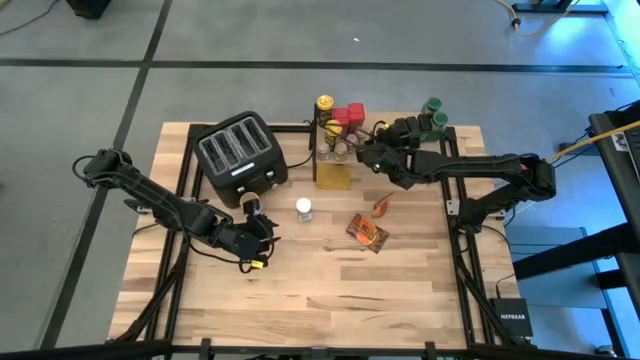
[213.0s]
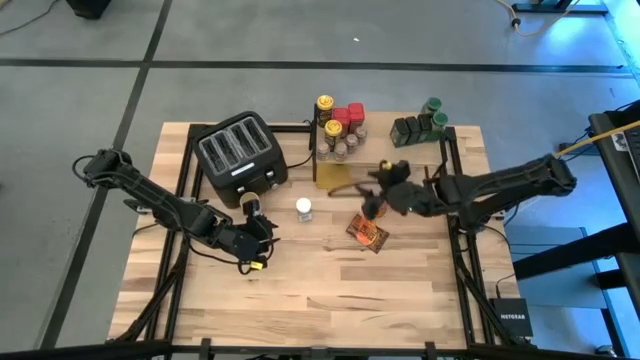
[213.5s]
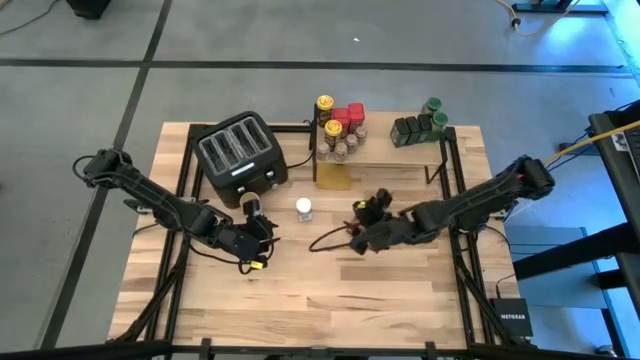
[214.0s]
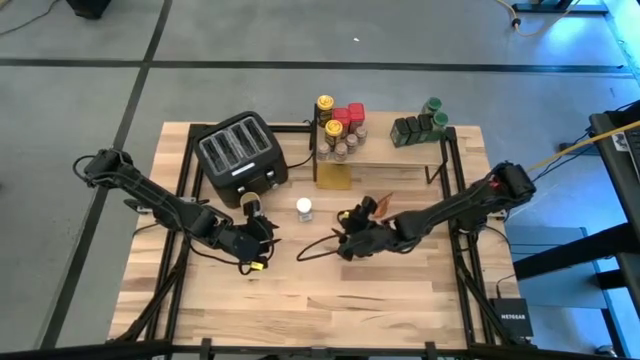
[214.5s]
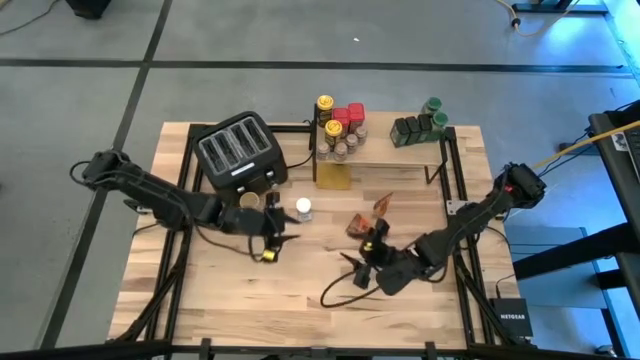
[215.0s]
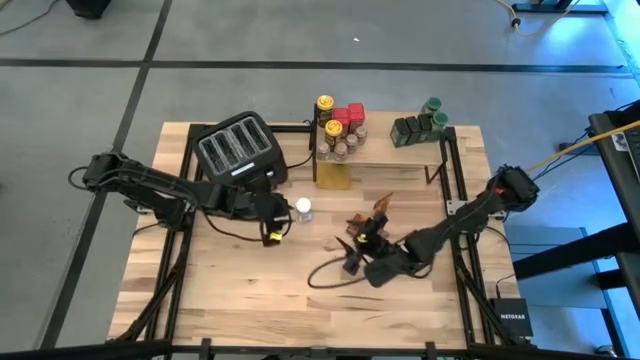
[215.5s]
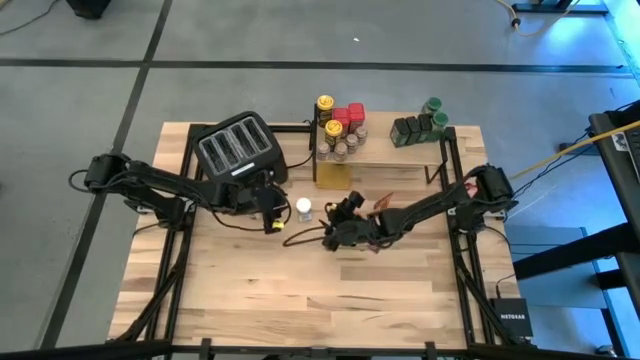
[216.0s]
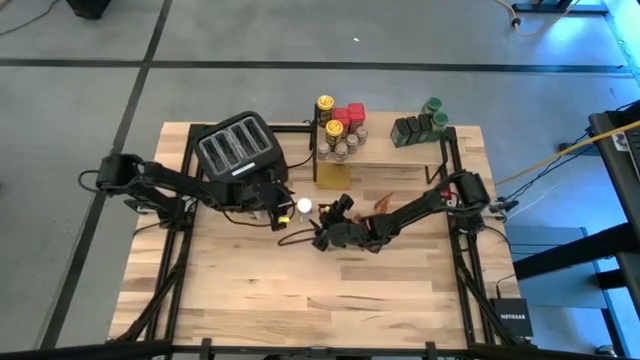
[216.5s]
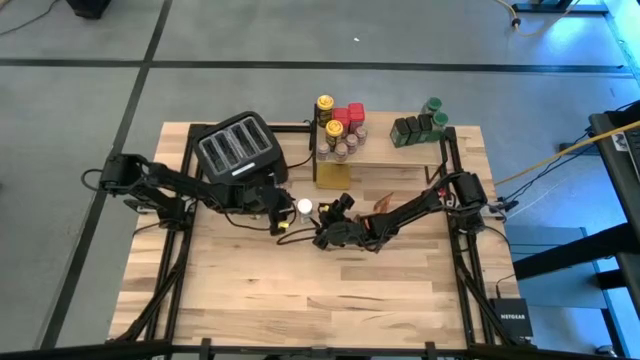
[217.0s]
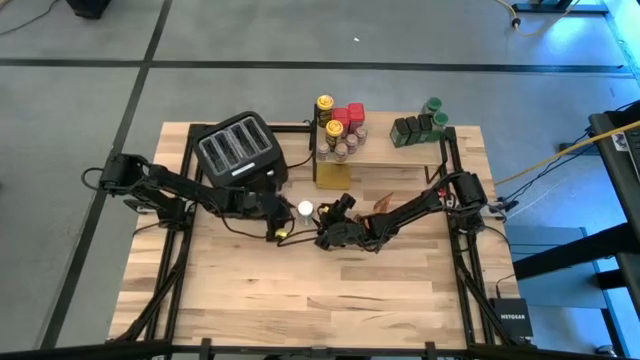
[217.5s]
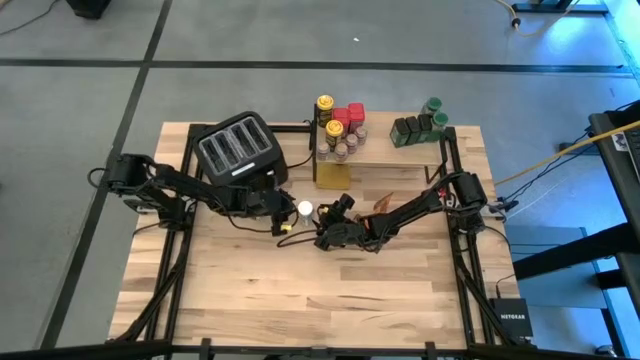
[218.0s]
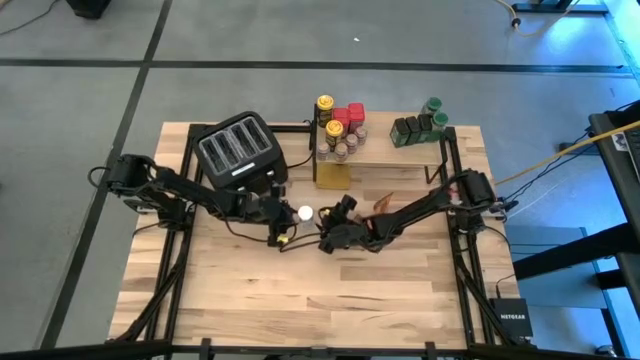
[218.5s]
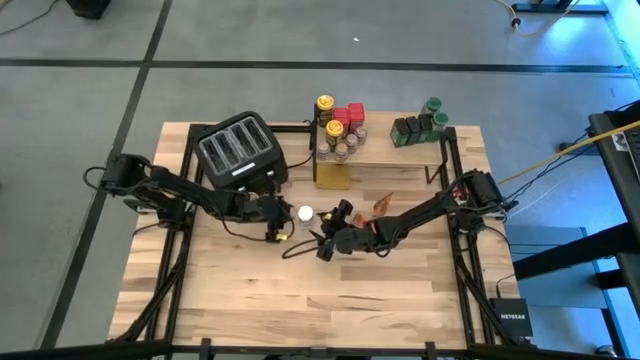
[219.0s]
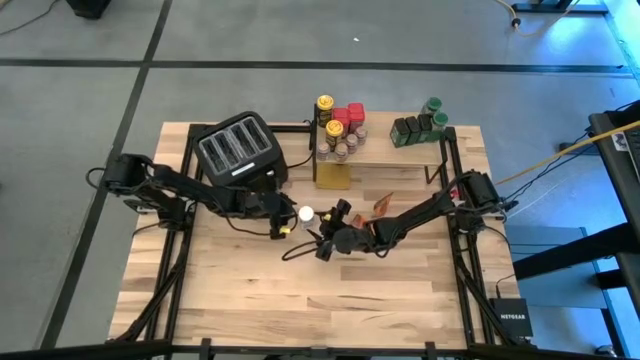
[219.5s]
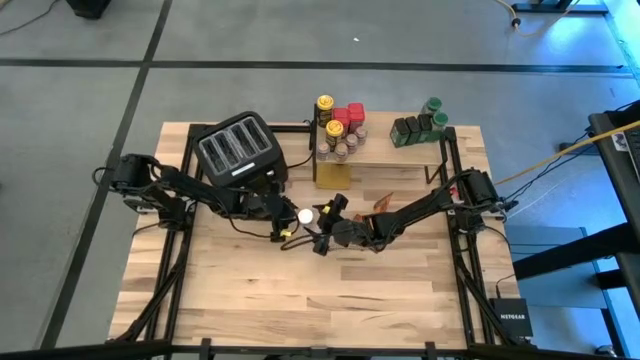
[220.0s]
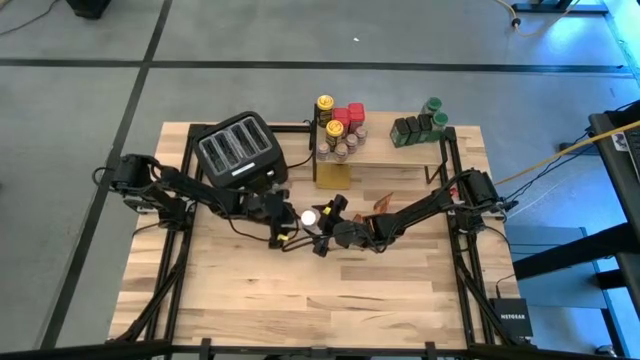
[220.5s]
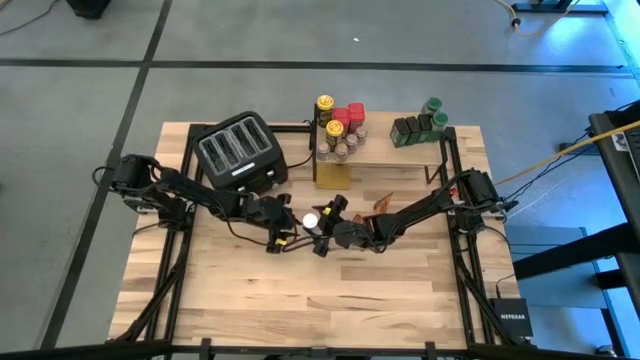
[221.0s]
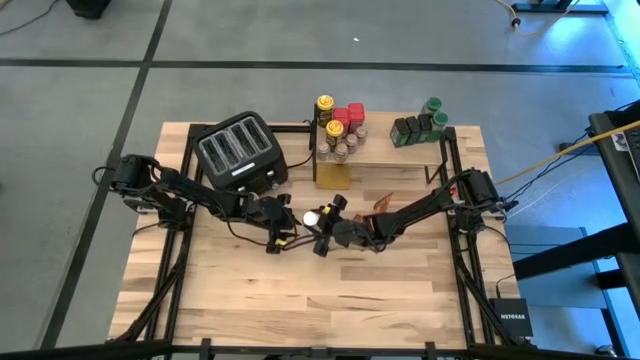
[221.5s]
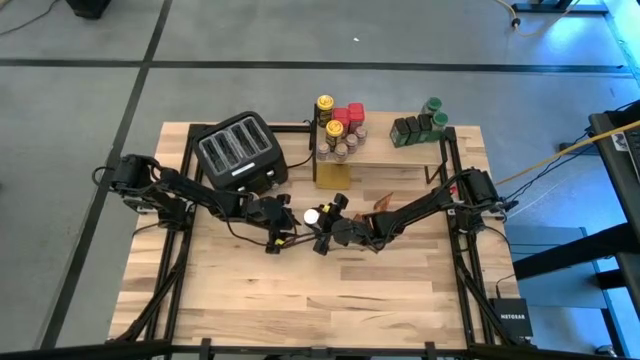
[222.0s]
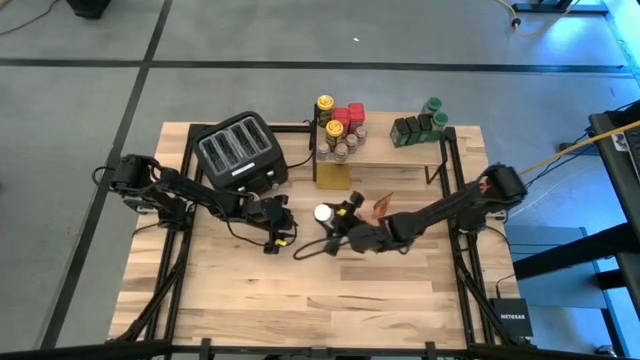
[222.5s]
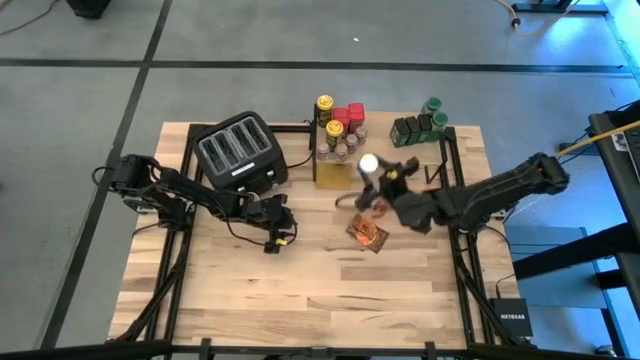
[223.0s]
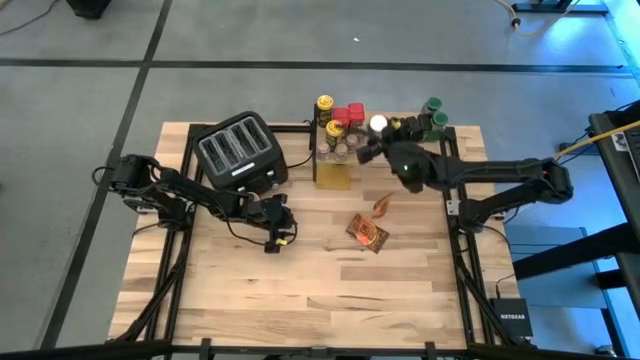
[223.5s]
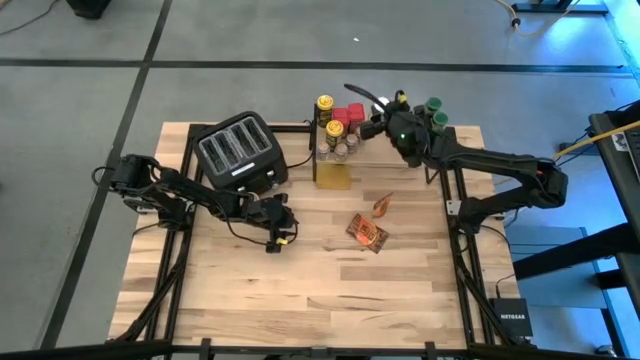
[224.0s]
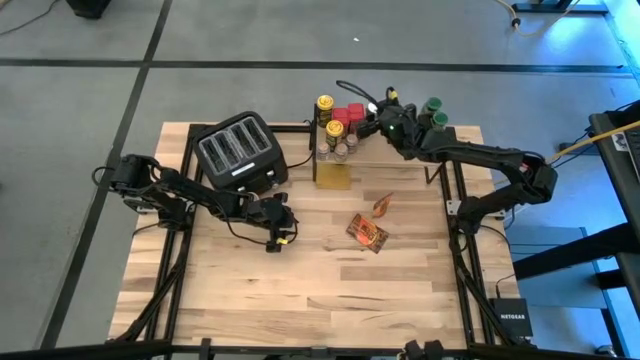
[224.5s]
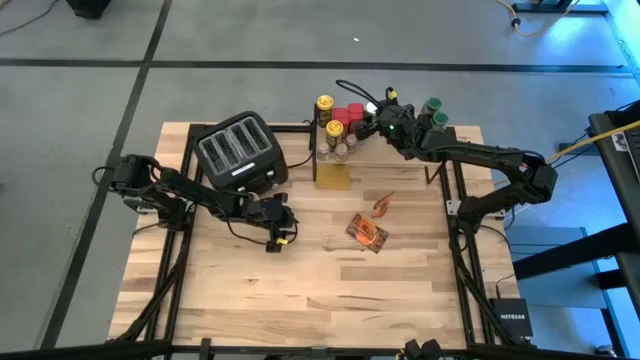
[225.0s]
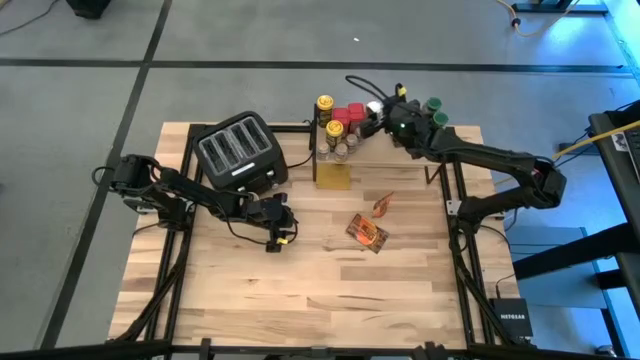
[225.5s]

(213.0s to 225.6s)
Task: Shelf spices
Put the white seasoning bottle on the shelf

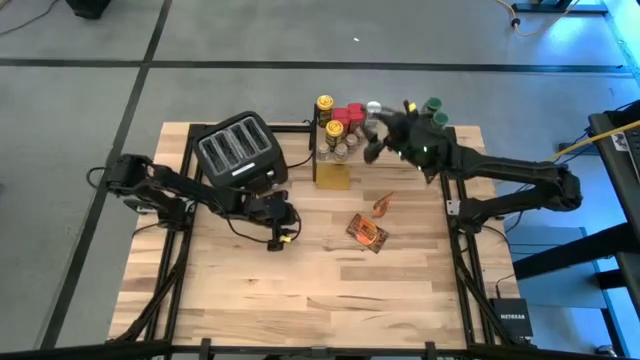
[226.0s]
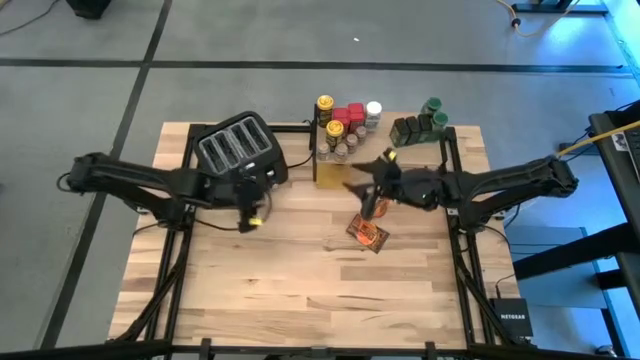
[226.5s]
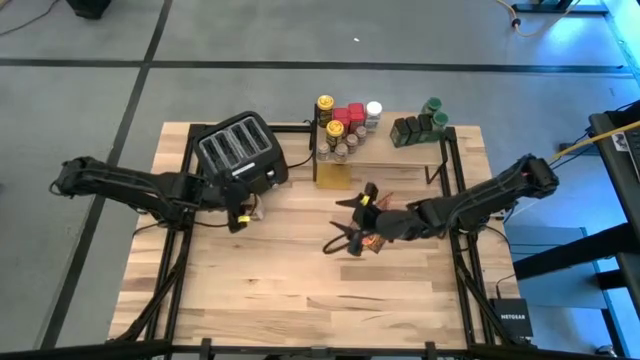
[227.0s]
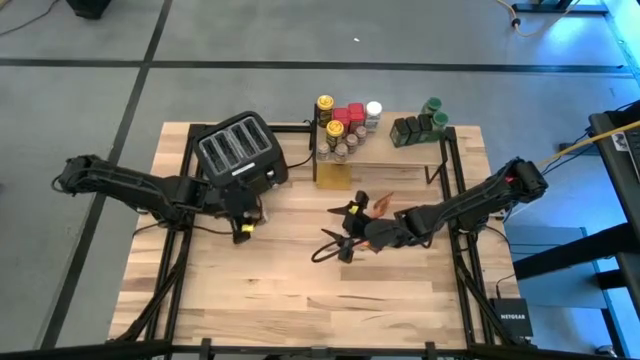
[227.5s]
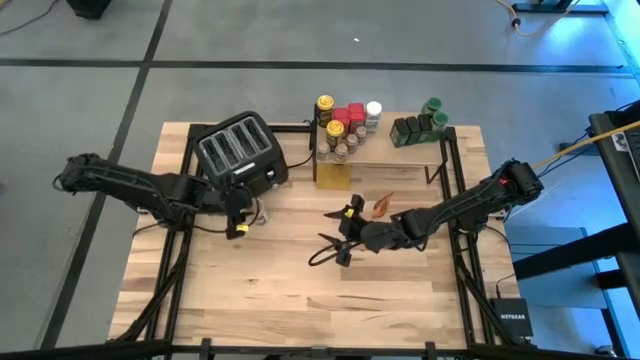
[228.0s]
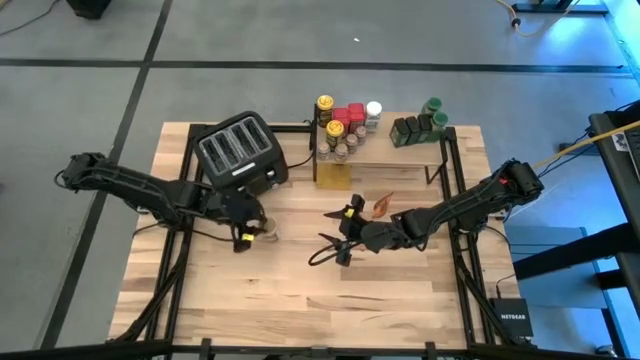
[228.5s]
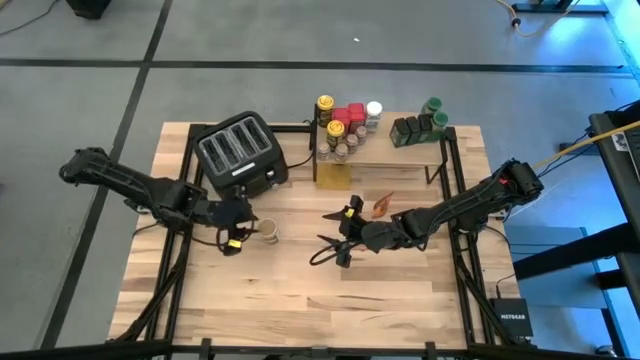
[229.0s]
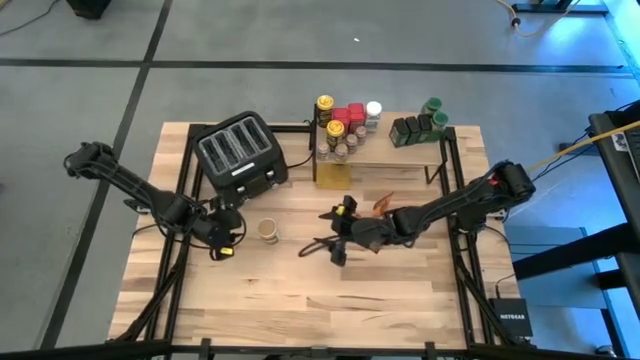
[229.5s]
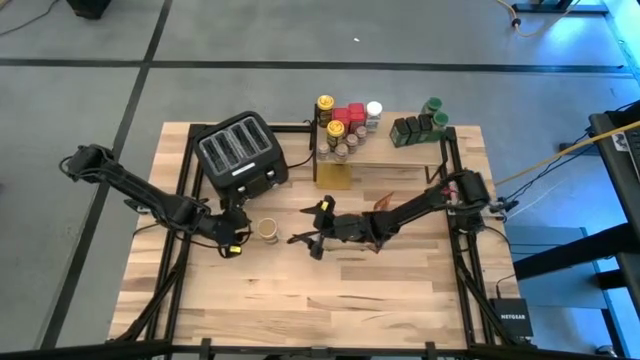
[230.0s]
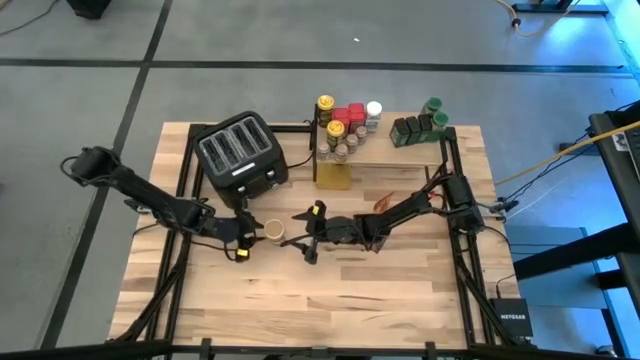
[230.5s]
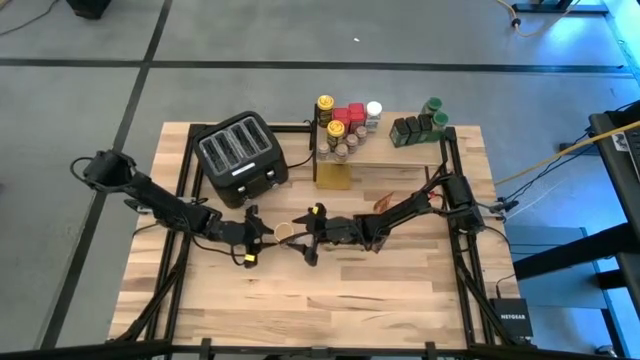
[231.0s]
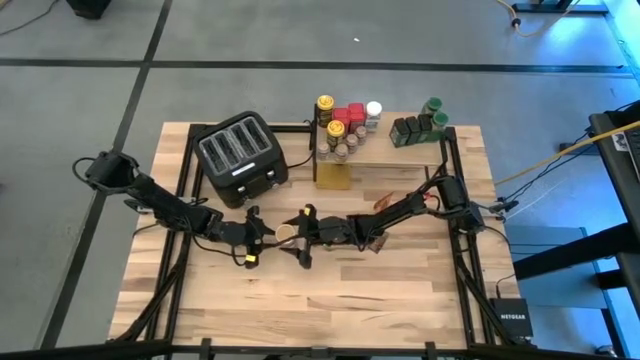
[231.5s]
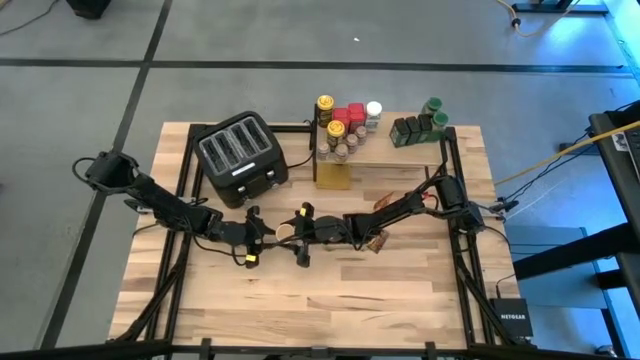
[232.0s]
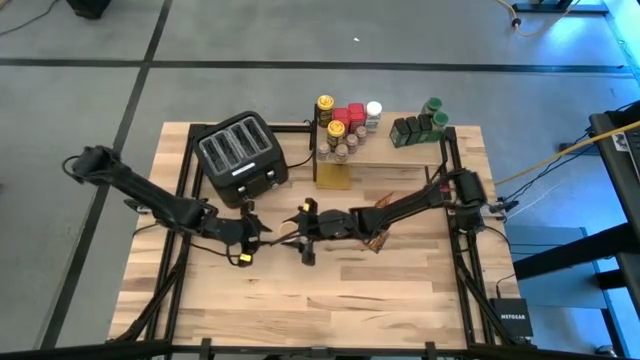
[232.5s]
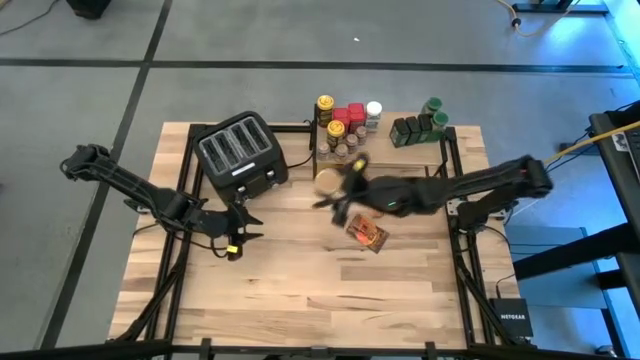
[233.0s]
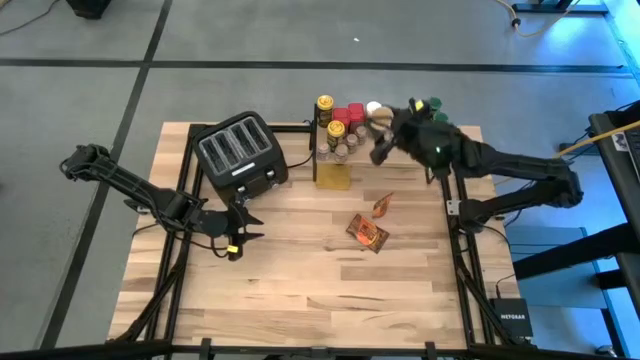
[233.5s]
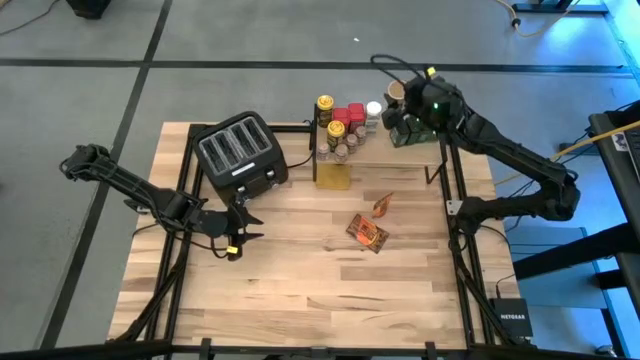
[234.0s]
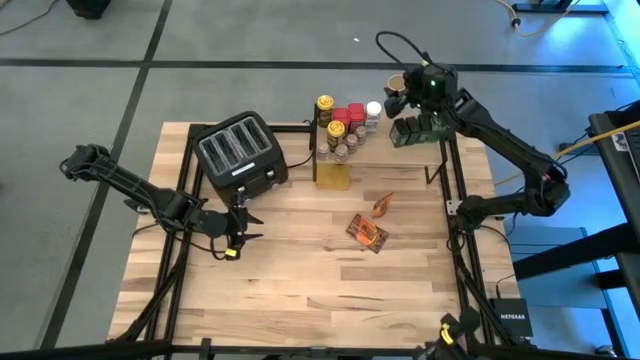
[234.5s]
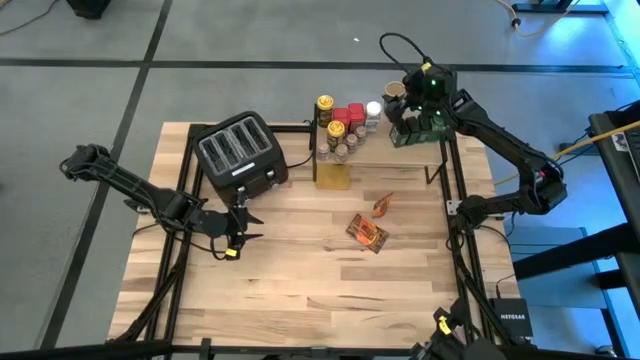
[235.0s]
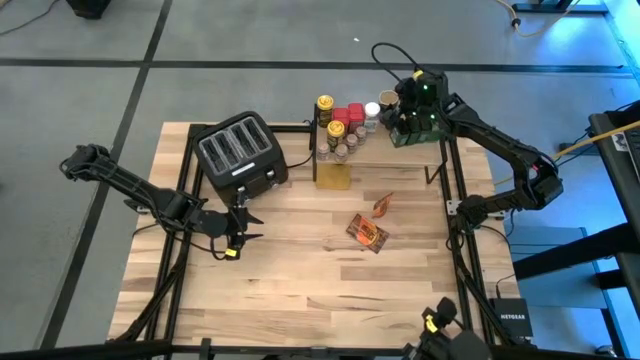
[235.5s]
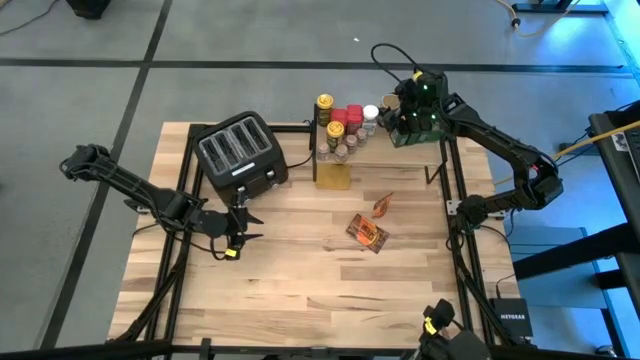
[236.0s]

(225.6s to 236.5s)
Put the gold seasoning bottle on the shelf
